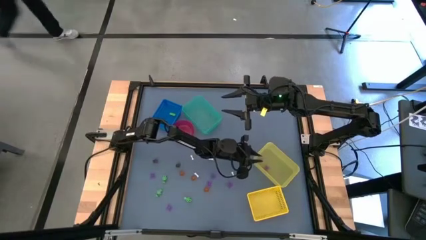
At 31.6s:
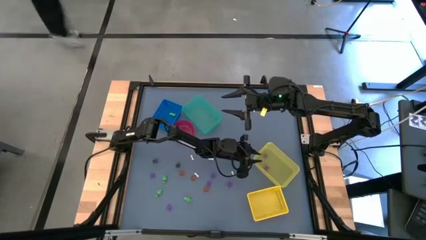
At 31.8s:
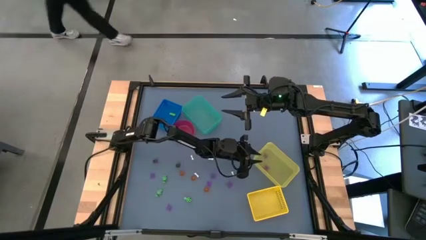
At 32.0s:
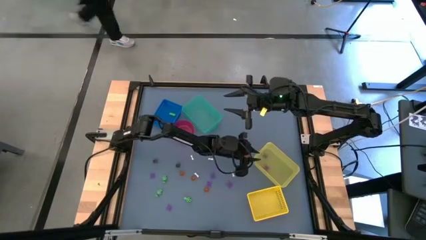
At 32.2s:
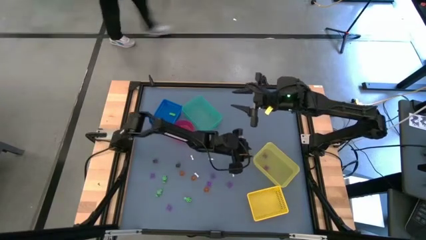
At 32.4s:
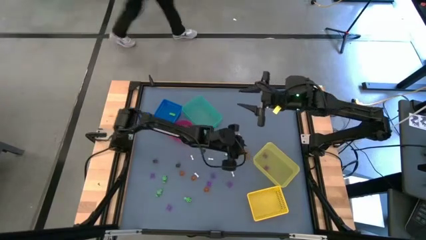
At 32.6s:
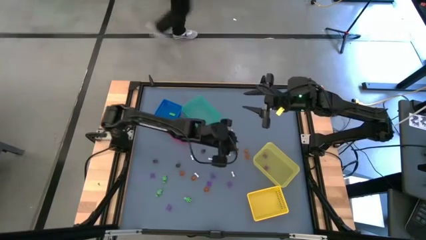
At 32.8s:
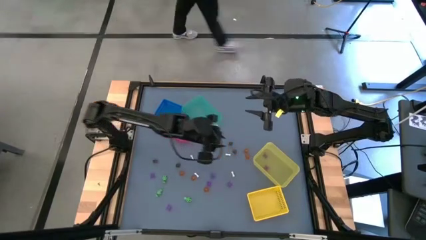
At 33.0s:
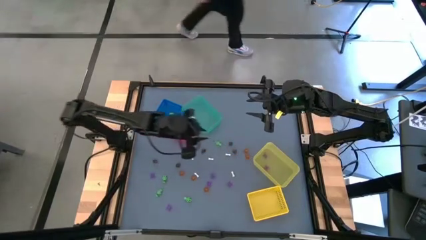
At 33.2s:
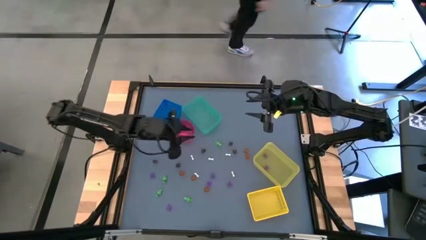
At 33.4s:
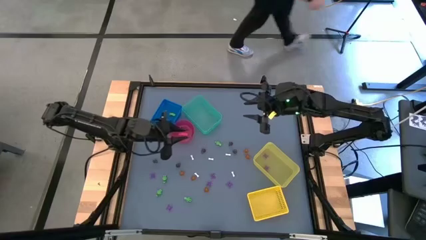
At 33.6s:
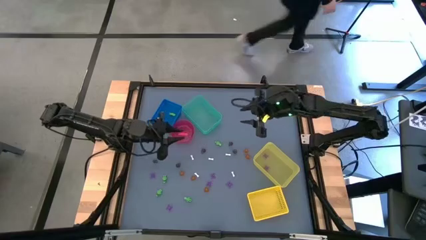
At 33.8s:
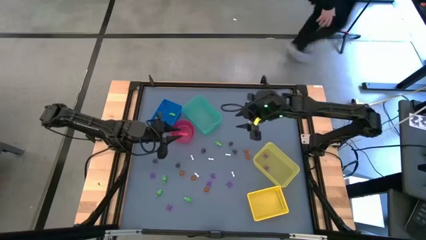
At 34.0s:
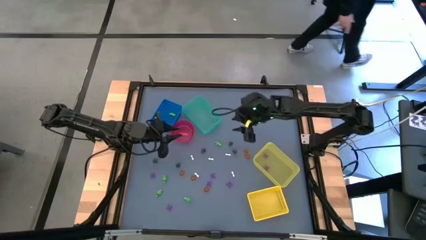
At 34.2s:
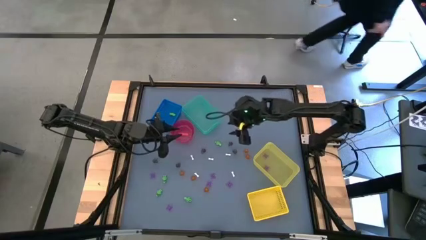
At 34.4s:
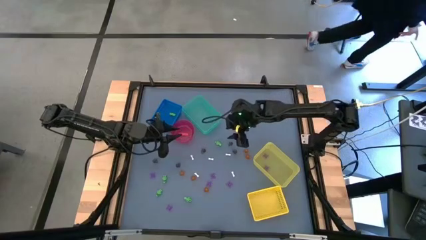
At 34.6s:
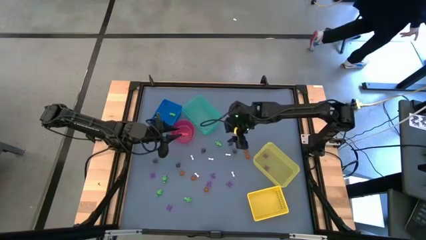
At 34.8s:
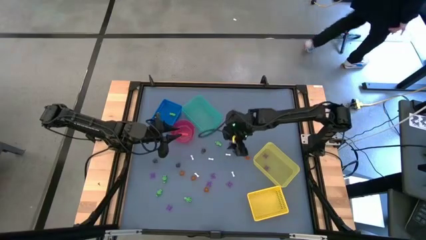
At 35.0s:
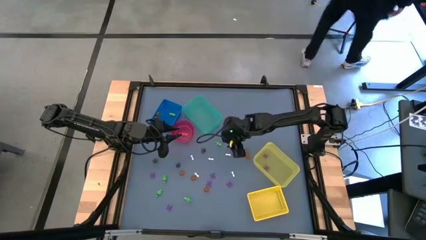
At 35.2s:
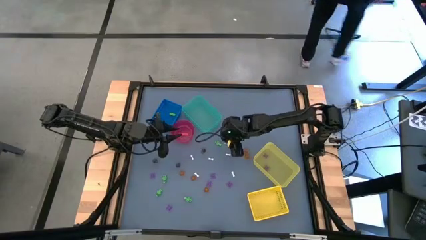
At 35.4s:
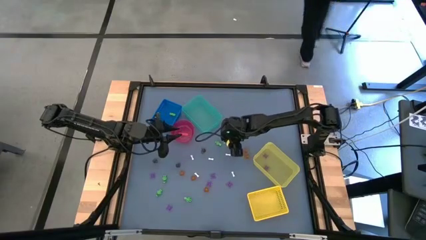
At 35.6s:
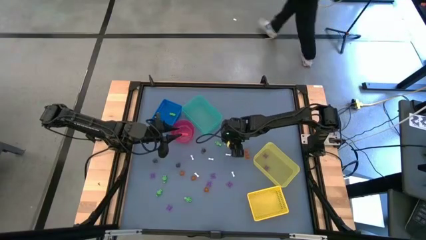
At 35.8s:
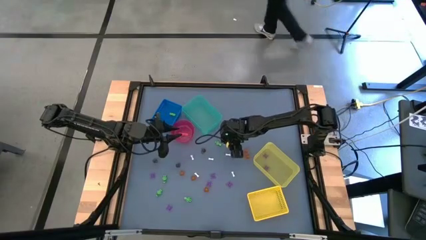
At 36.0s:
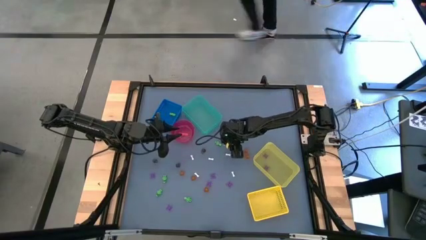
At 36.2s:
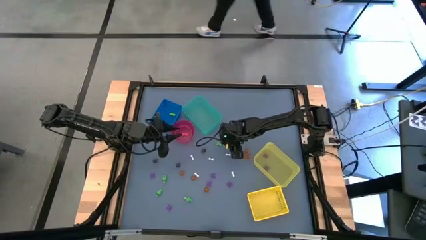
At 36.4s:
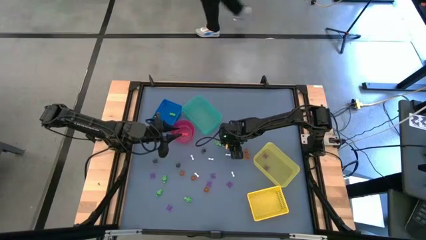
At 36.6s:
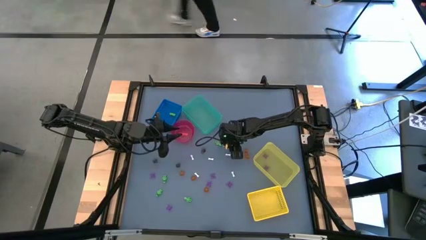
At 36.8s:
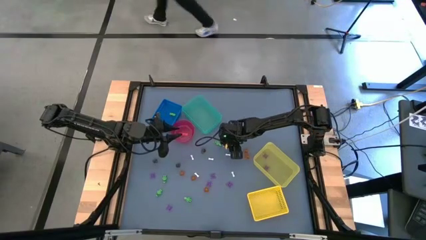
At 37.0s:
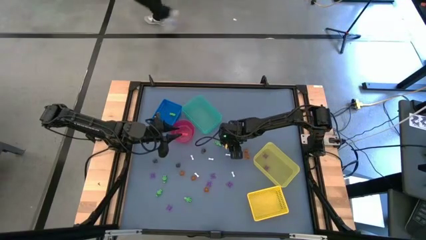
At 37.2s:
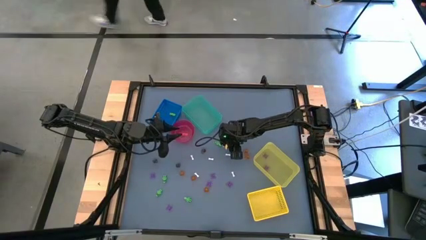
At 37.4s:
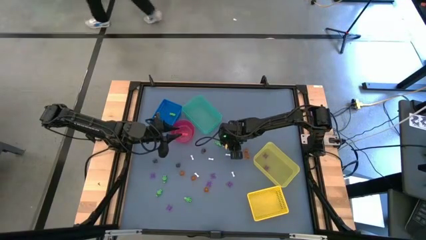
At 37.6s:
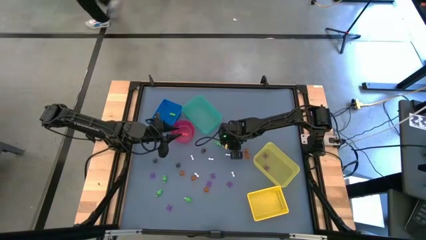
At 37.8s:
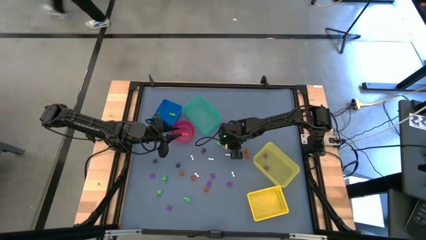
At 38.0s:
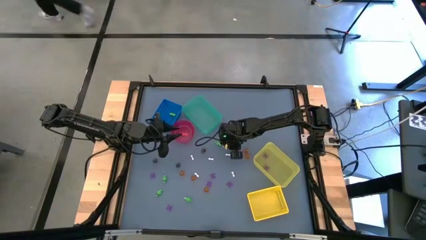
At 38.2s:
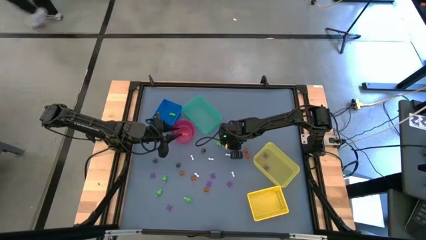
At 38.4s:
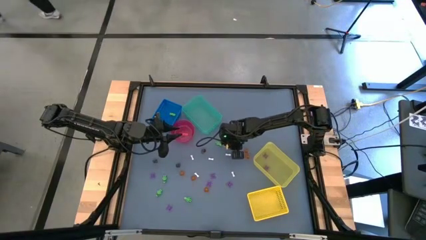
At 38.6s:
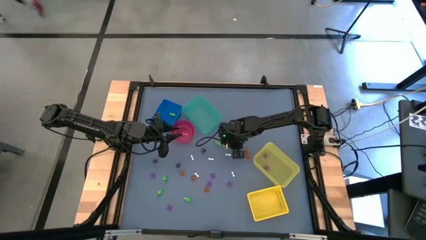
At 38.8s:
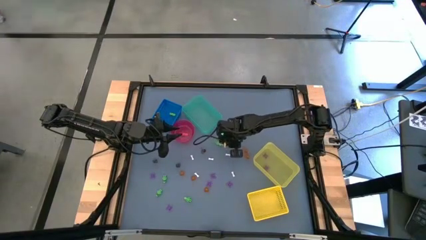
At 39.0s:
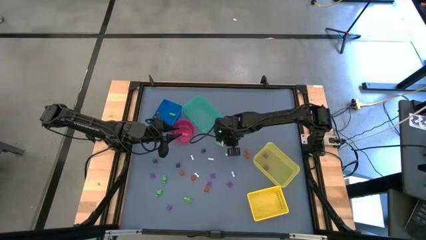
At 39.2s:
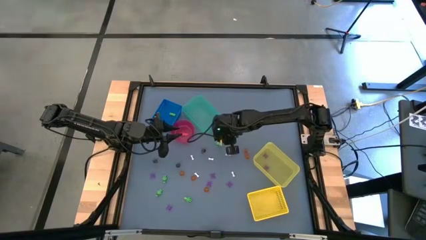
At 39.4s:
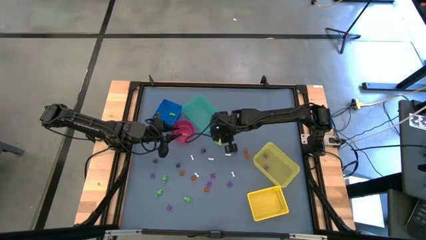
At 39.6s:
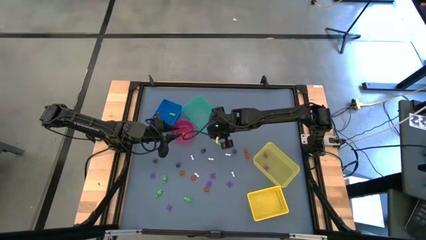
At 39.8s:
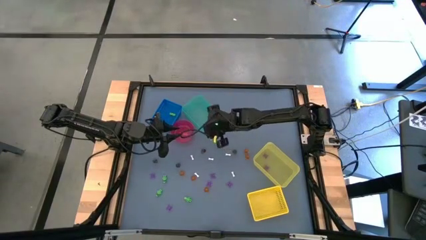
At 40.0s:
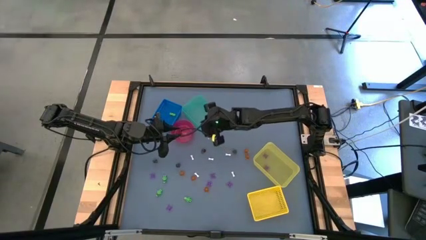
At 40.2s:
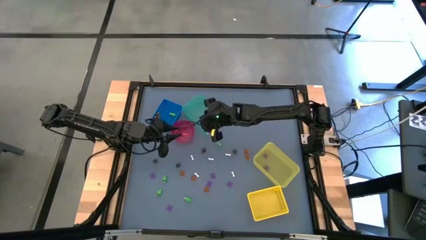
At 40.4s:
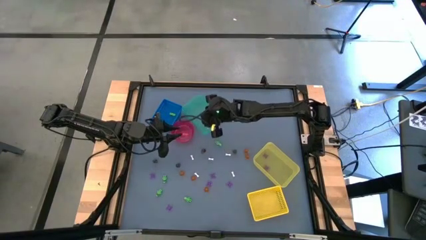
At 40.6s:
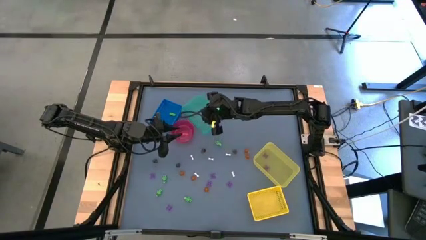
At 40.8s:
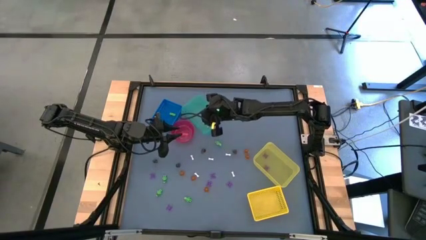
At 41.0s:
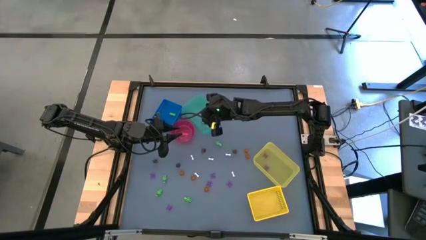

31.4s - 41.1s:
Task: Sort Halloween decoration
Put the black skull toy into the green bin

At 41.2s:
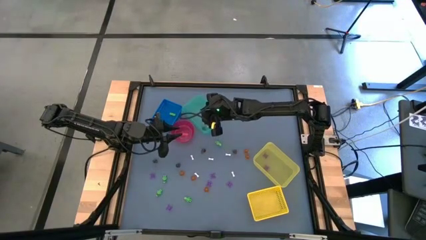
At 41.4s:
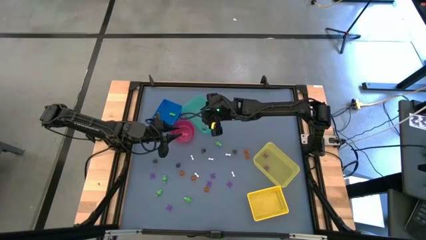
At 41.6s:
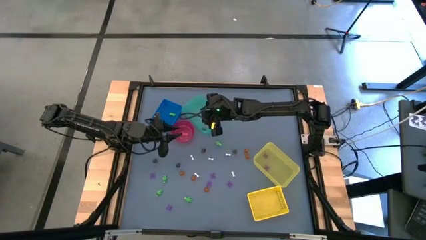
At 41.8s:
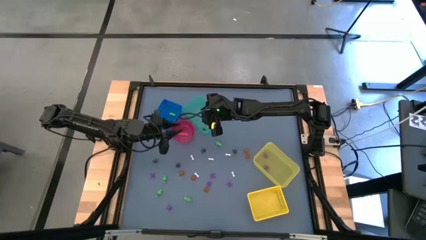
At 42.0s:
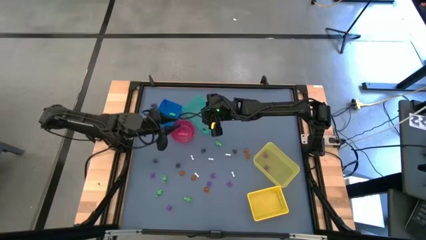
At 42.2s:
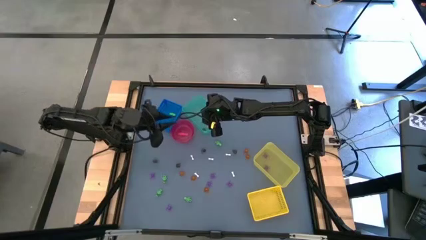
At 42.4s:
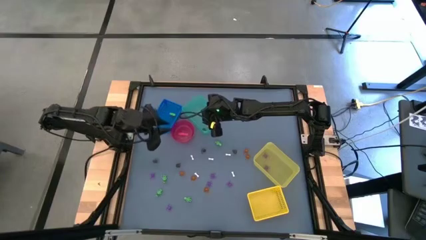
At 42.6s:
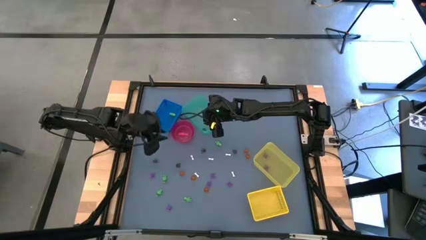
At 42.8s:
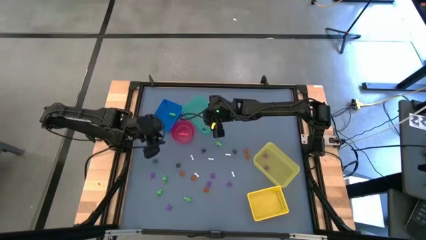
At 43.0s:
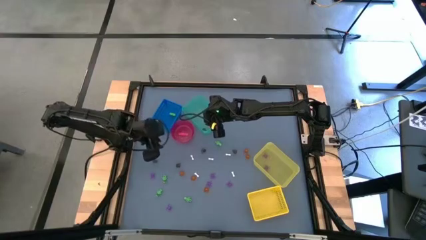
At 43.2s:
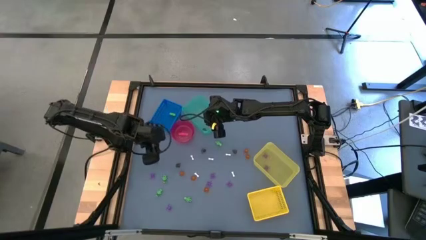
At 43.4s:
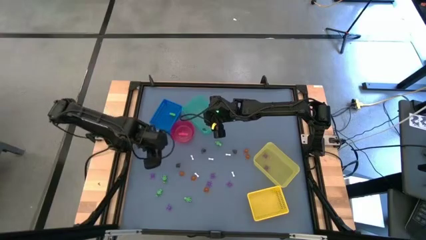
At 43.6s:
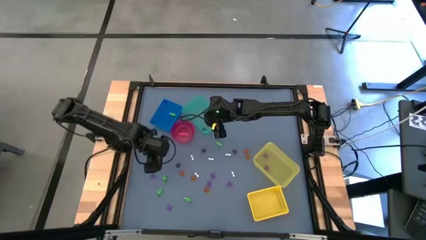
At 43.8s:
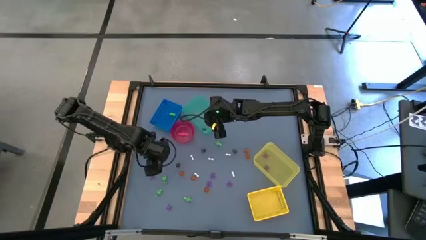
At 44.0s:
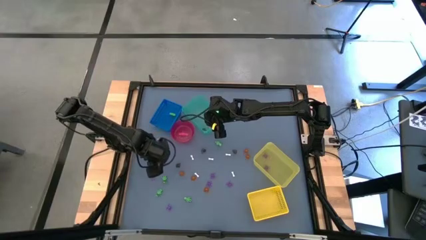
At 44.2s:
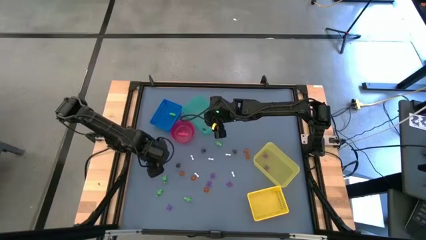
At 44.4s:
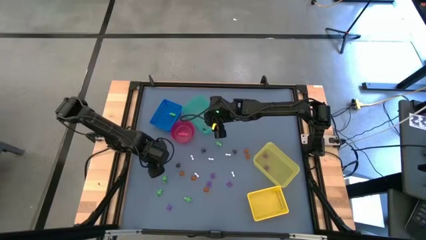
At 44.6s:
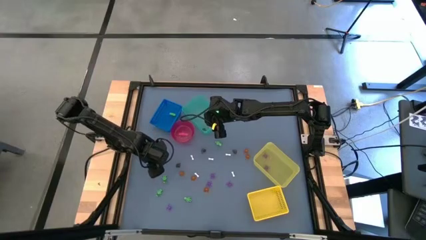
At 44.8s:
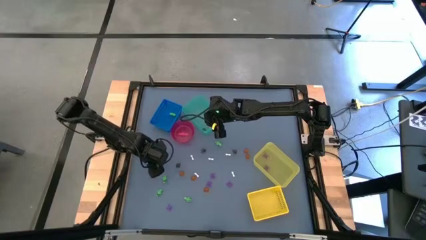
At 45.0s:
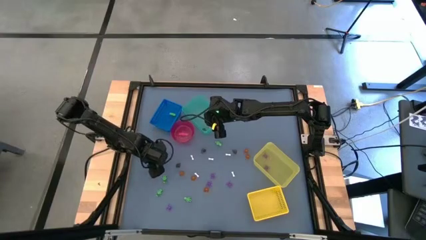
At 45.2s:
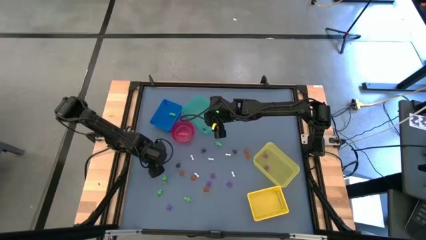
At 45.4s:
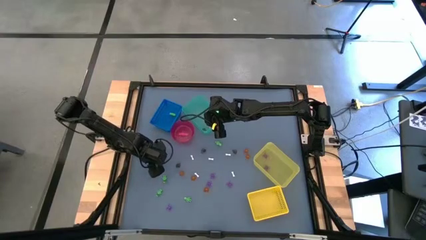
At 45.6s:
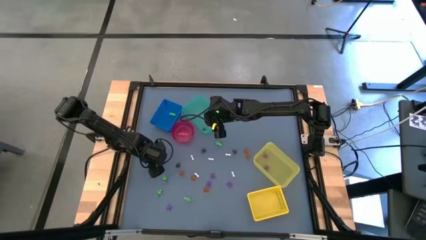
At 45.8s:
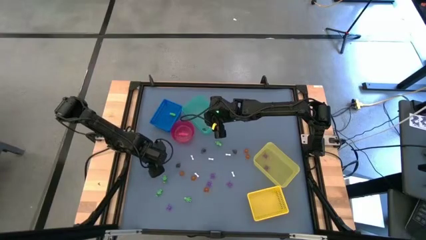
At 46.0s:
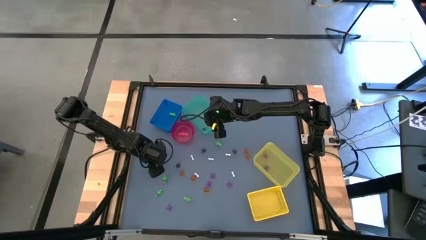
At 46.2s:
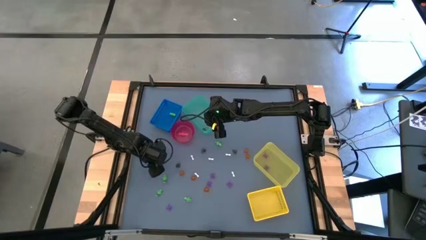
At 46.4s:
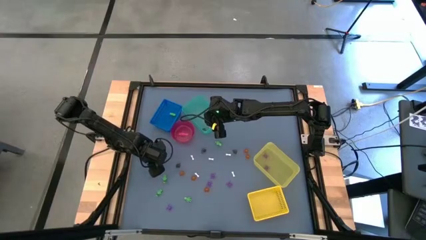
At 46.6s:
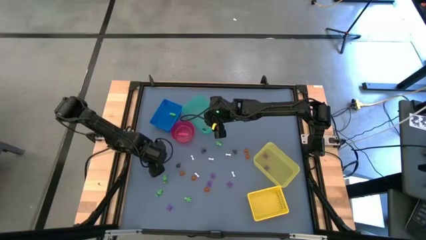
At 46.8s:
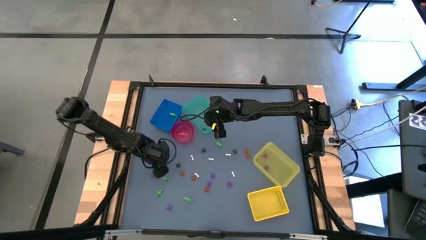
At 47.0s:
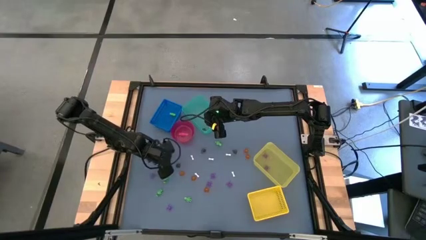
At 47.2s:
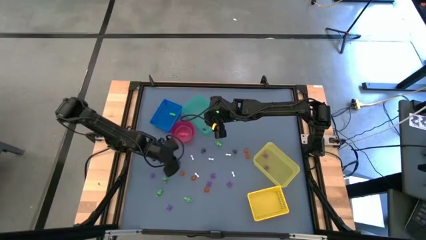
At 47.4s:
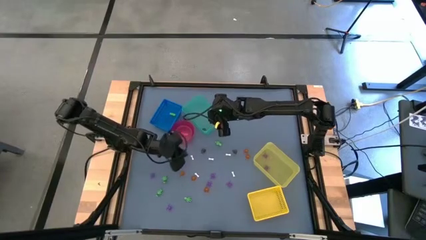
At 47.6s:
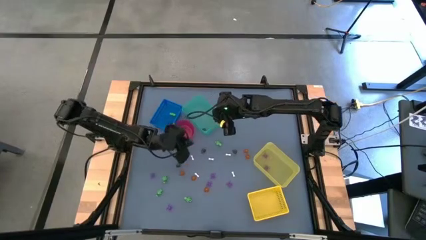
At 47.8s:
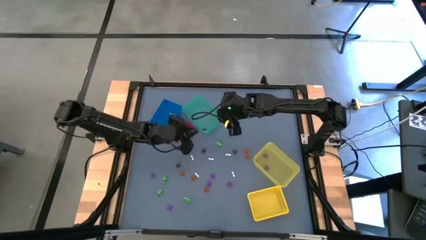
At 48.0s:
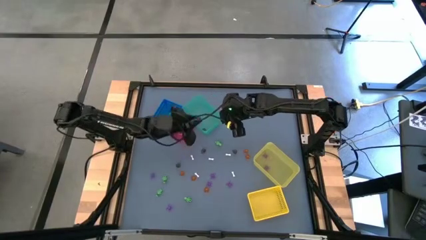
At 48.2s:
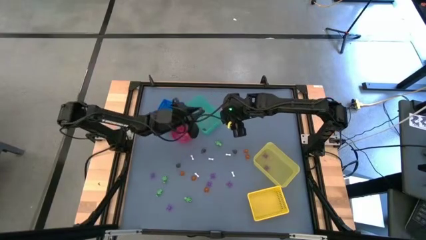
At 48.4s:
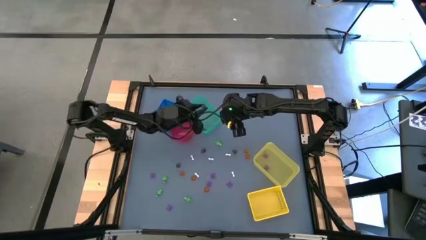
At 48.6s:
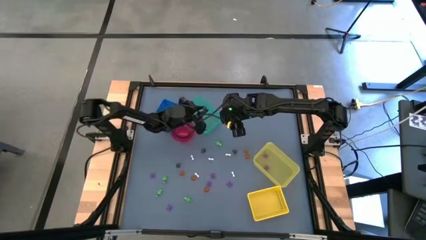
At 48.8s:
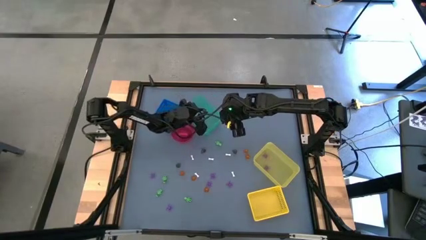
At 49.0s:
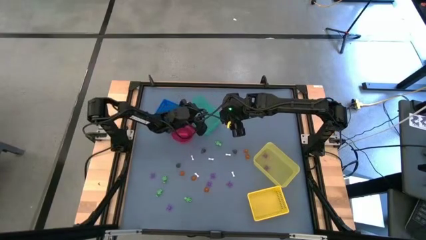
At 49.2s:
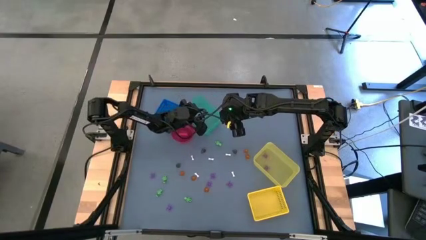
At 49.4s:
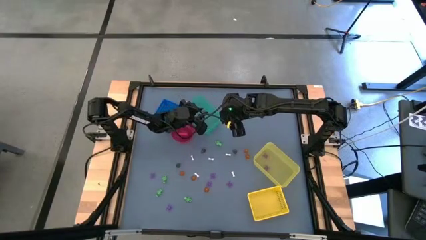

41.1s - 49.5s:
Put the black skull toy into the green bin
